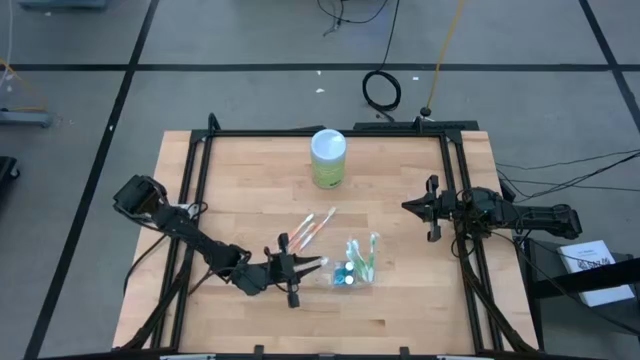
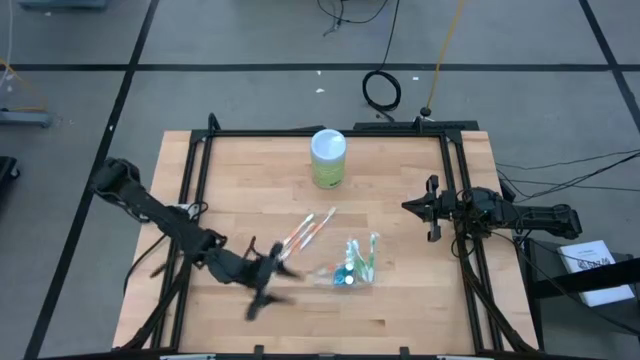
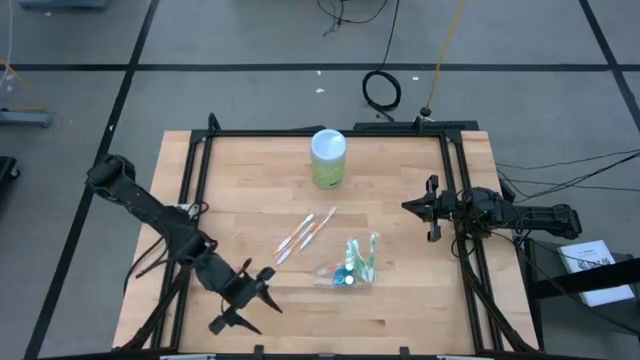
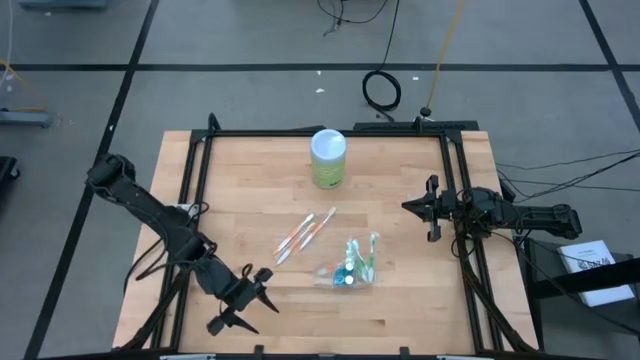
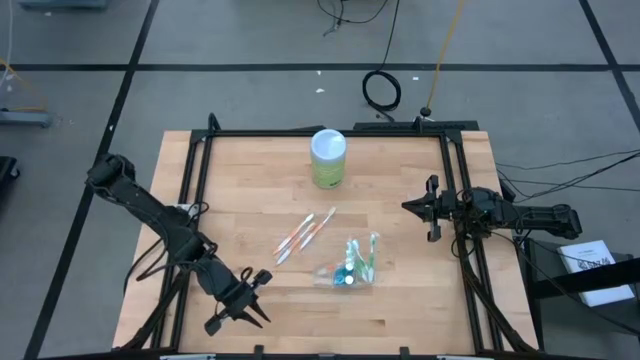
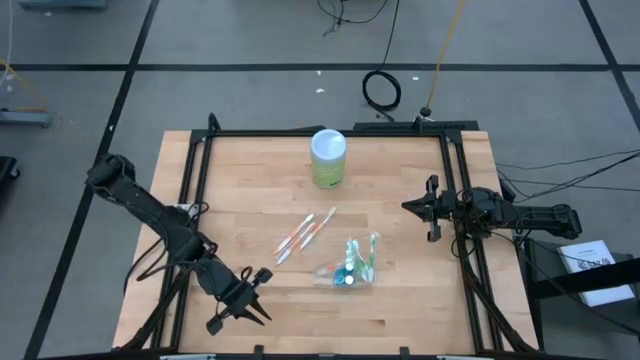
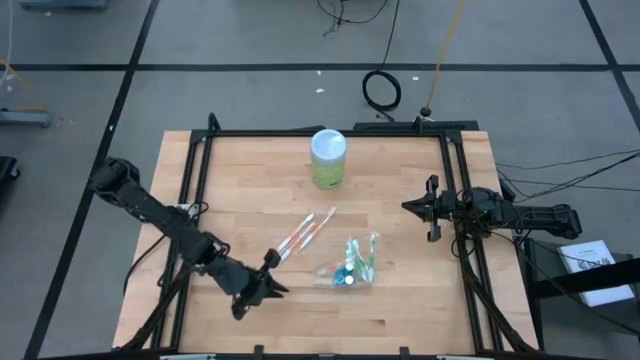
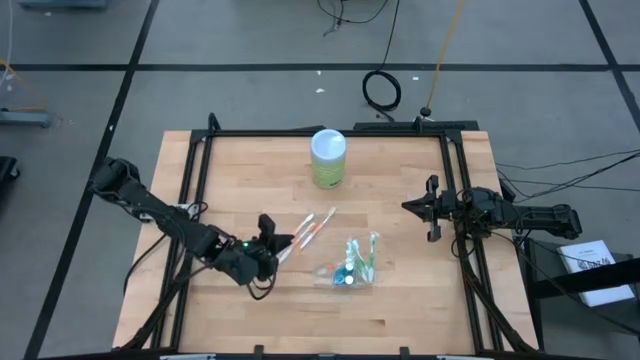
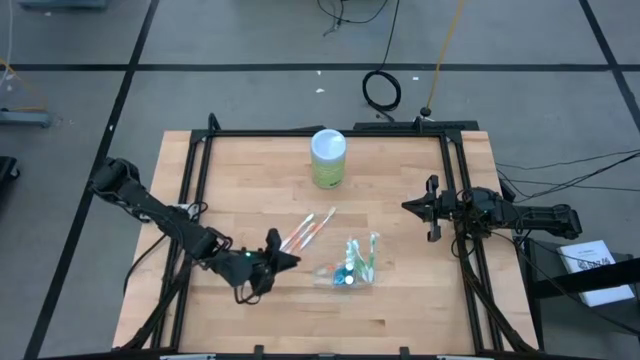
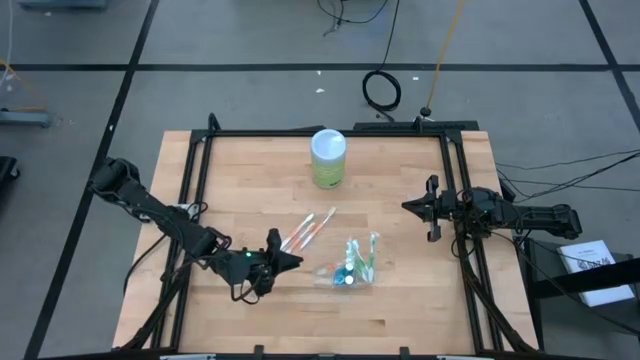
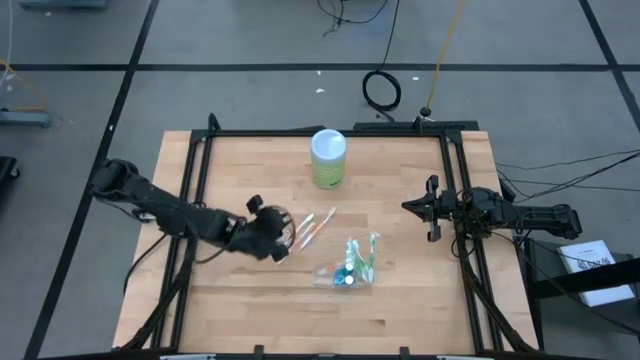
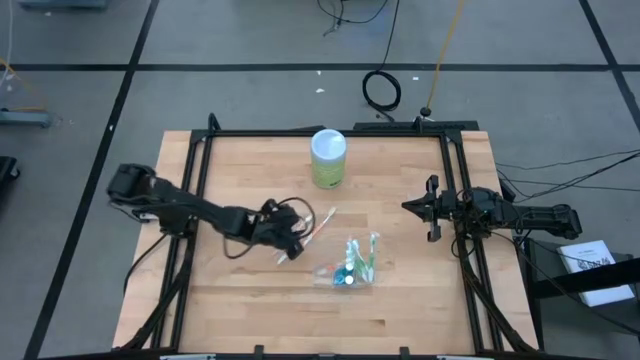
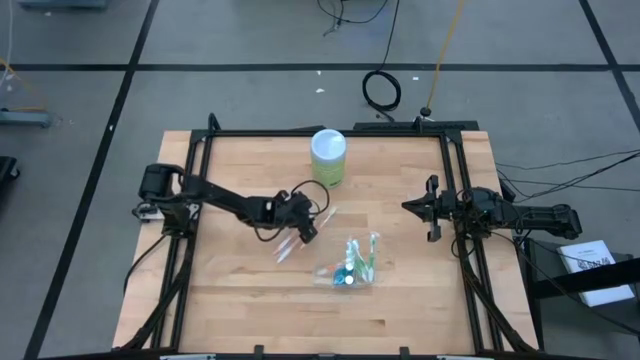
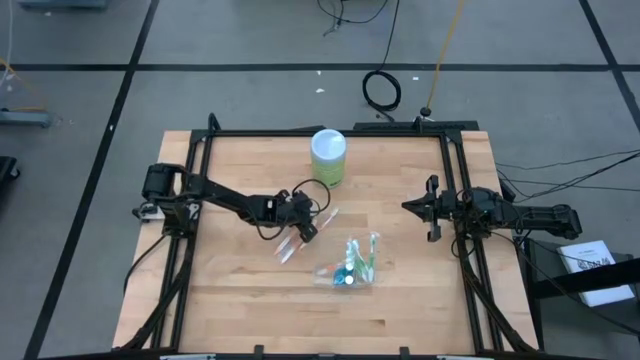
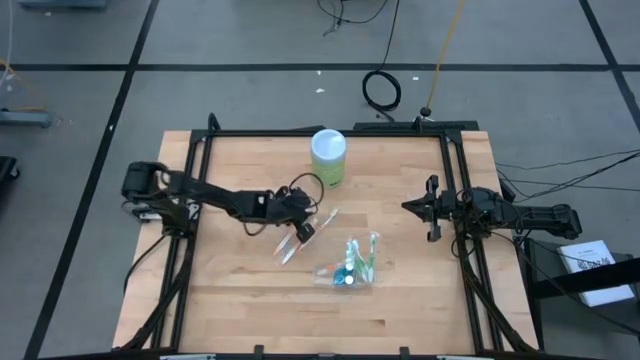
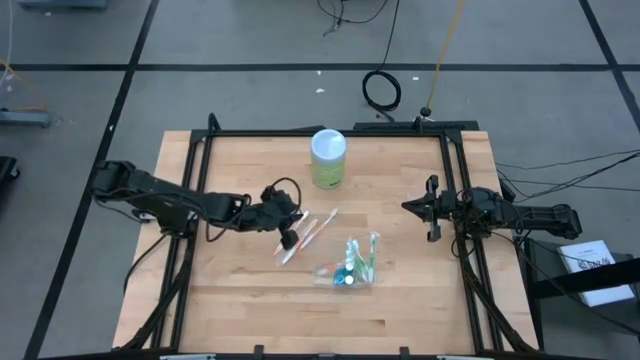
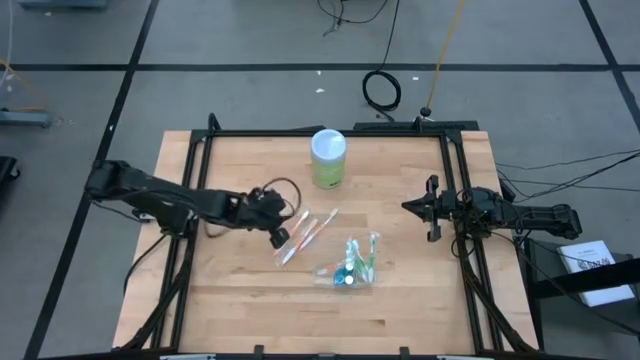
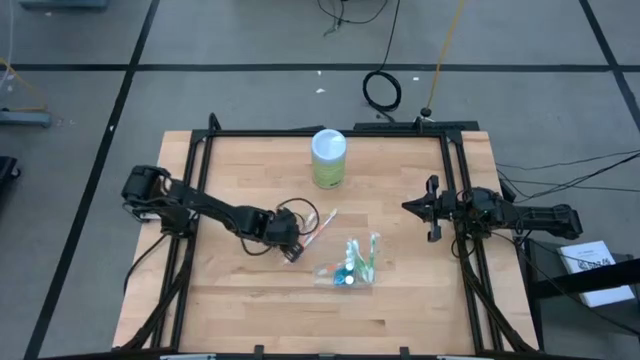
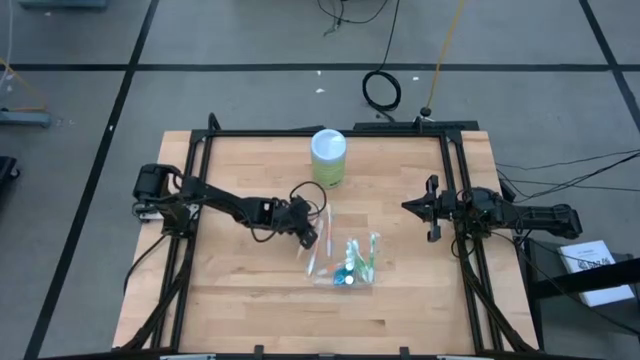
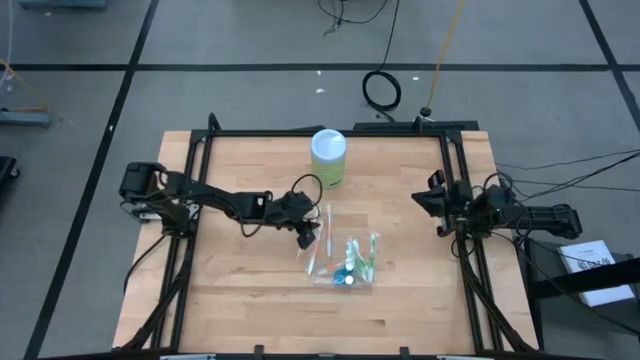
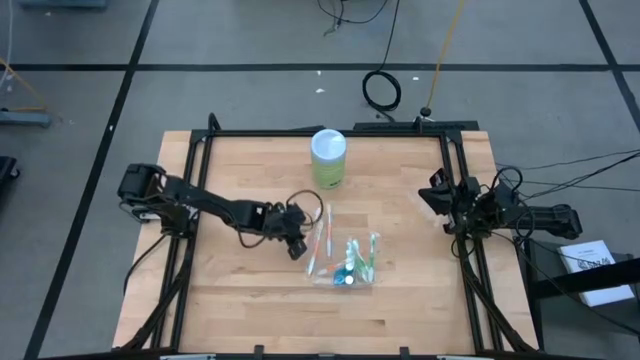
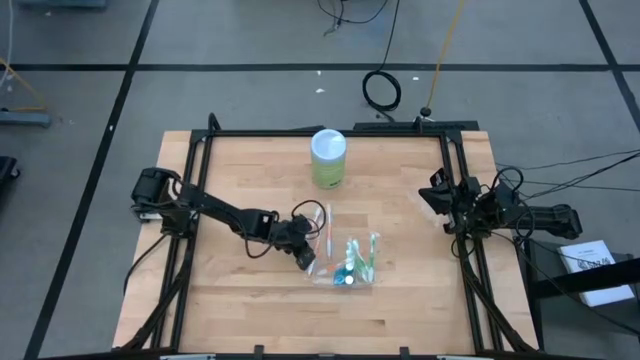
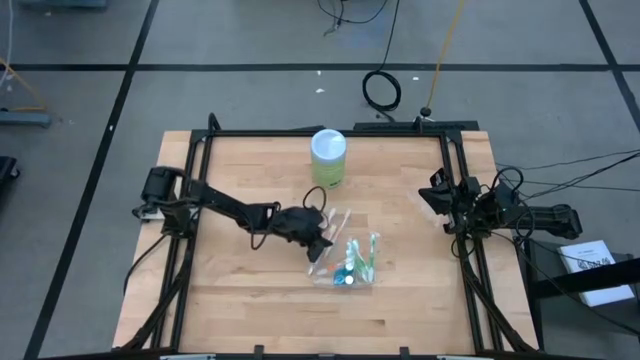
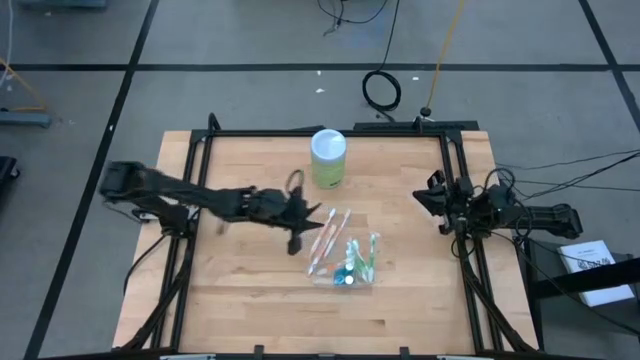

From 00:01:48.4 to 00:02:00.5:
Task: Pick & Place toothbrushing station
Put the orange toothbrush into the left compartment of the transparent organizer

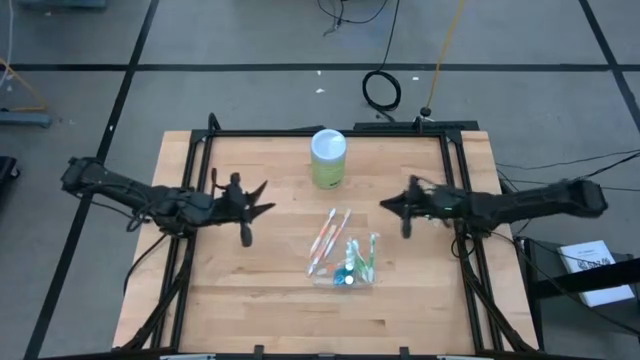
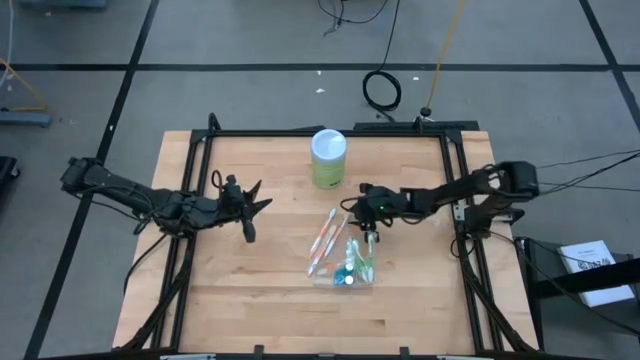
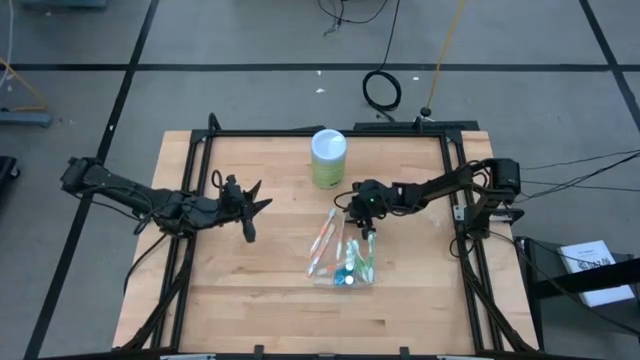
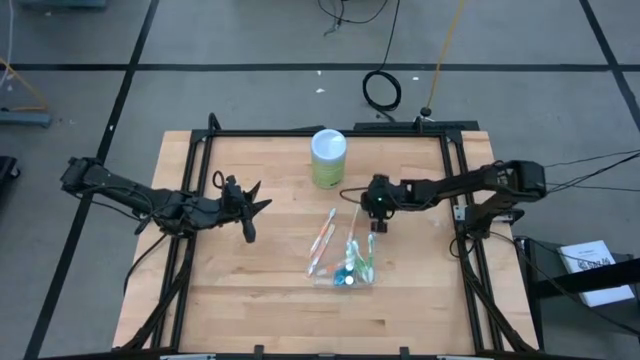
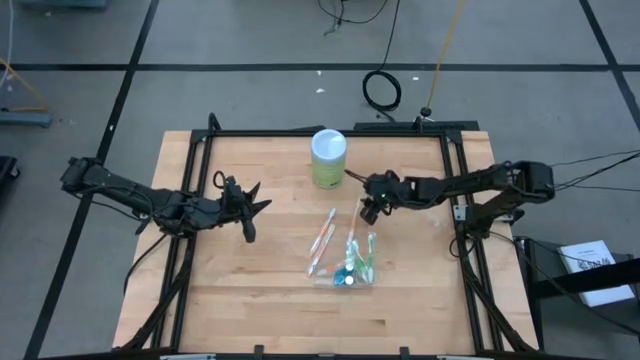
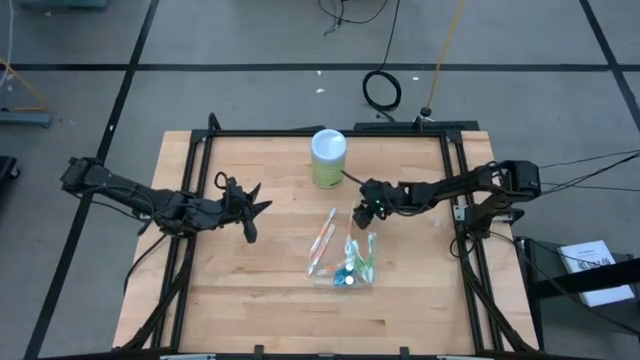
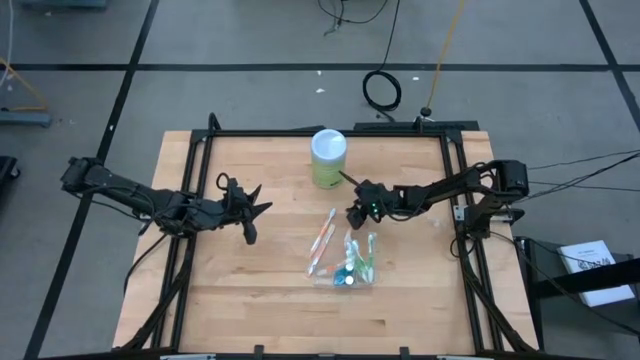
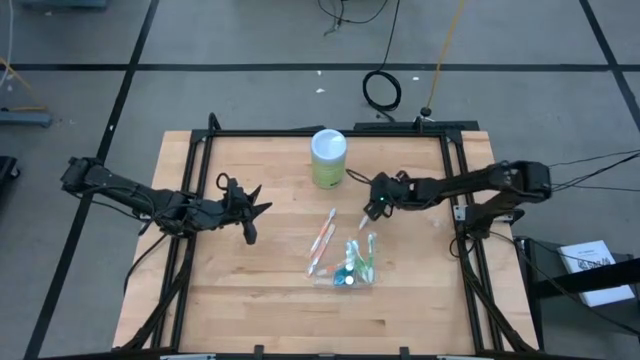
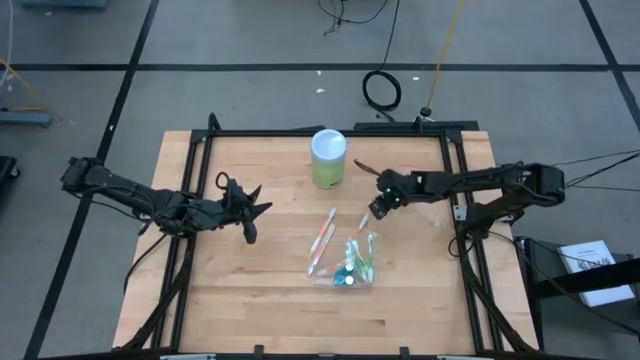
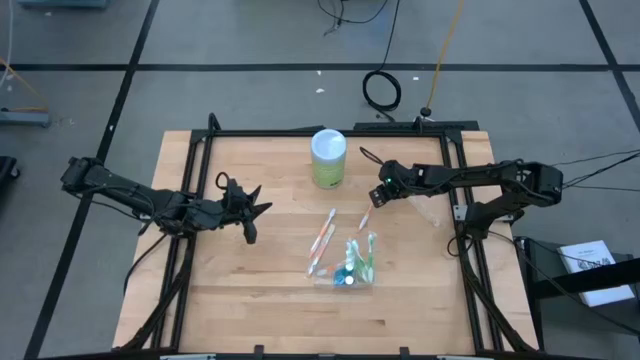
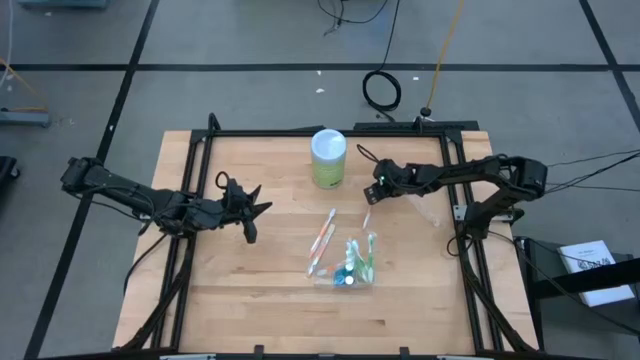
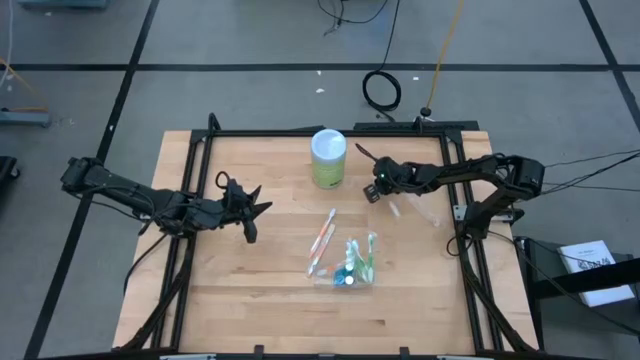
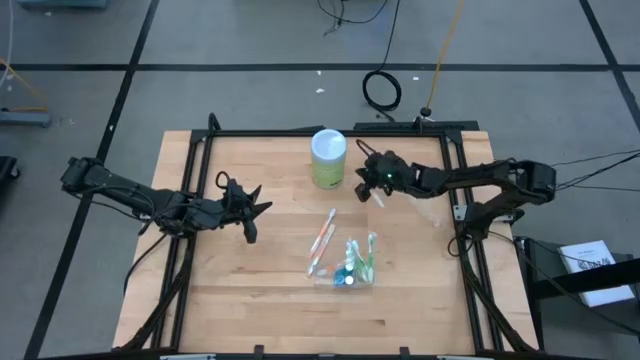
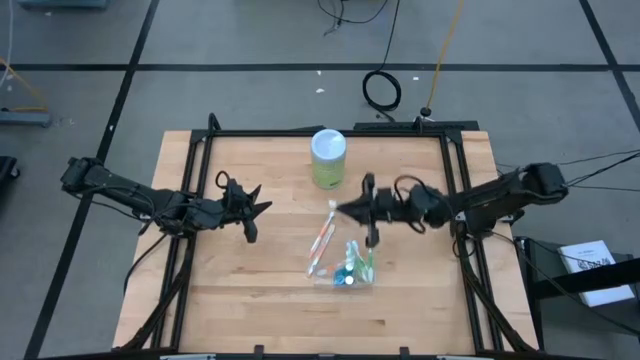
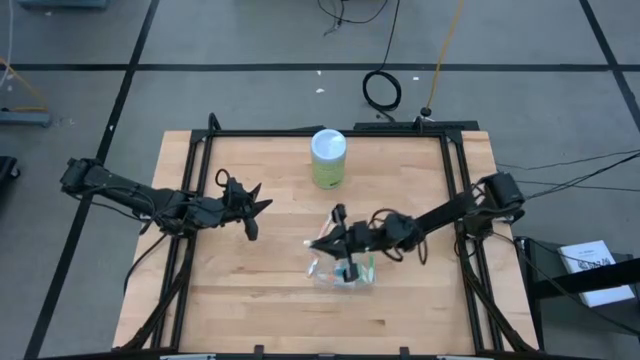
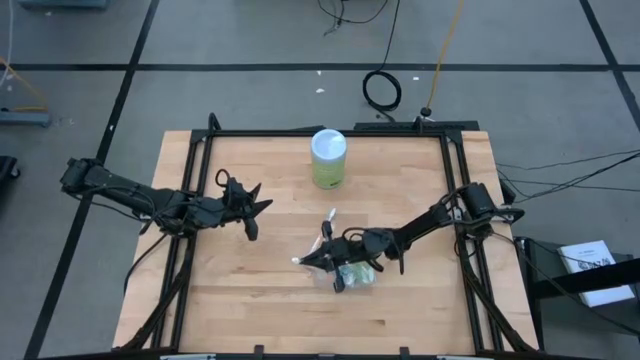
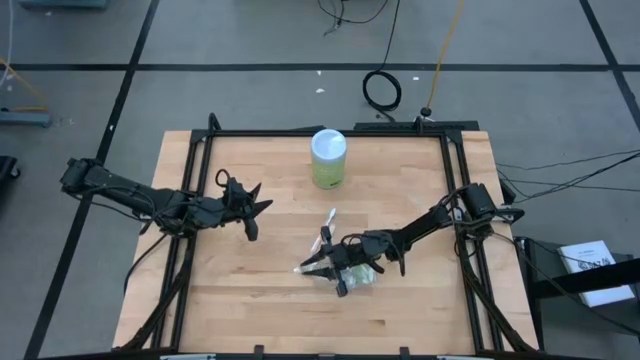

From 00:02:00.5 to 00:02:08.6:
Put the orange toothbrush into the left section of the transparent organizer

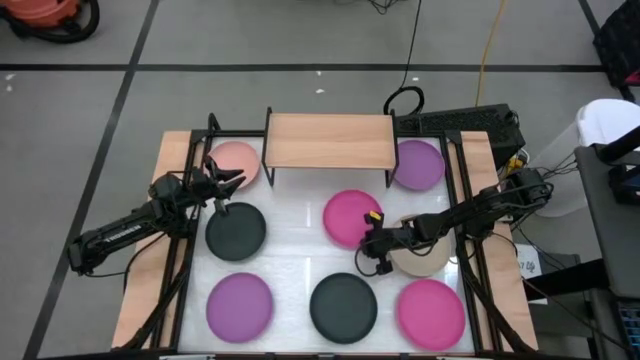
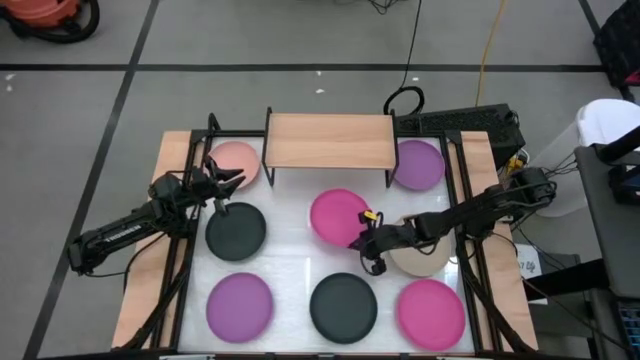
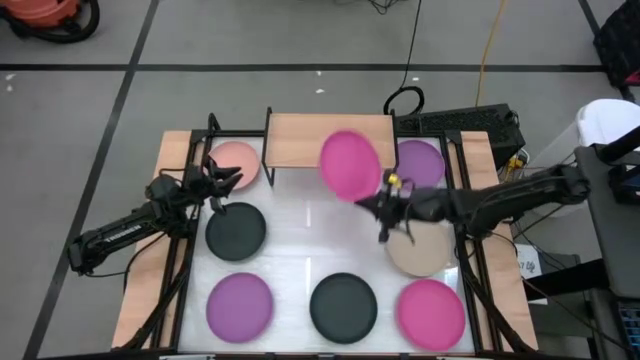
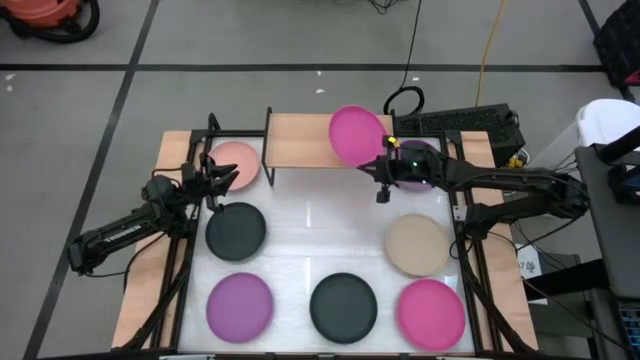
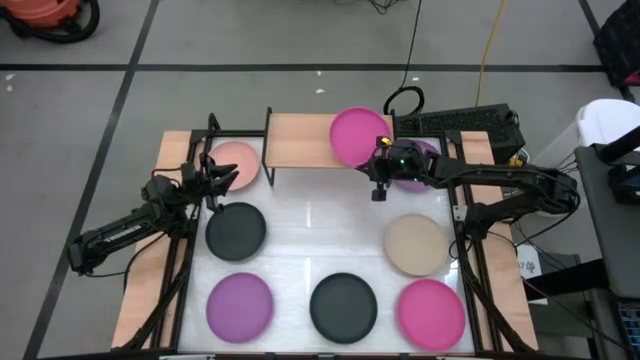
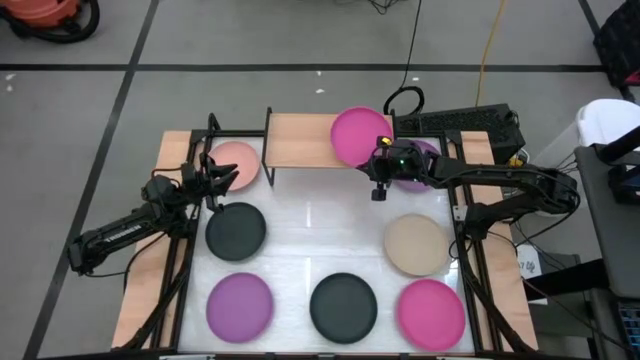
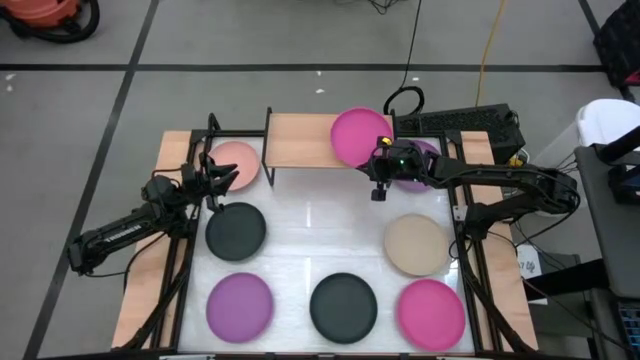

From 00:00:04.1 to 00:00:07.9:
Task: Place and stack plates onto a shelf
Put the top pink plate on the shelf
